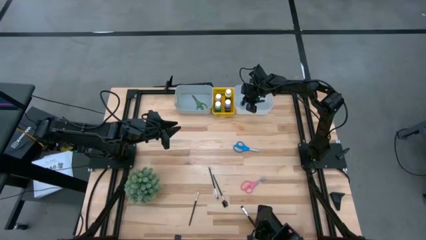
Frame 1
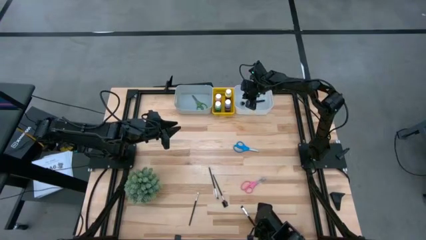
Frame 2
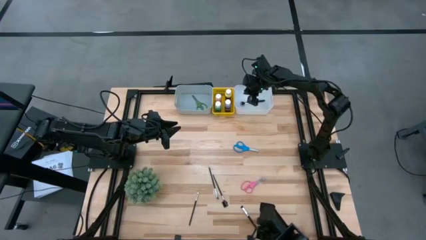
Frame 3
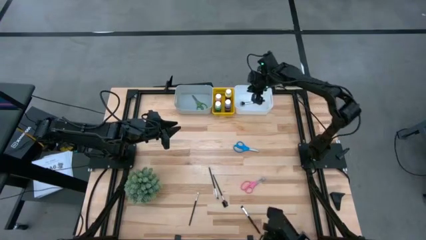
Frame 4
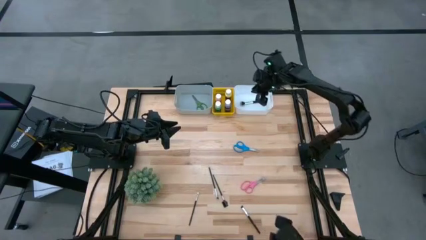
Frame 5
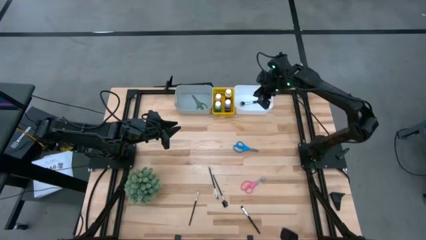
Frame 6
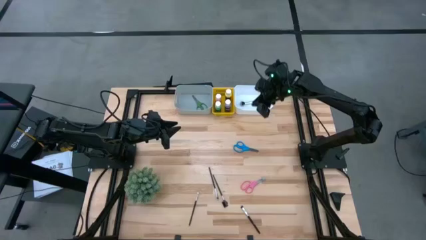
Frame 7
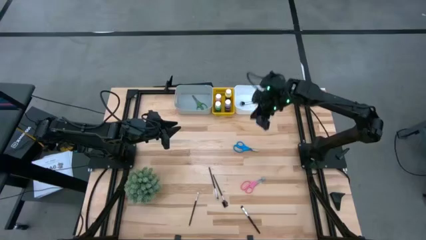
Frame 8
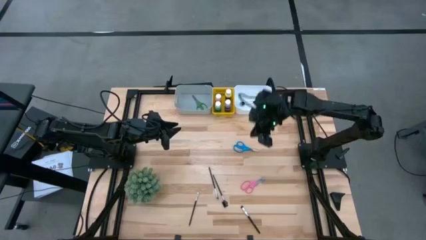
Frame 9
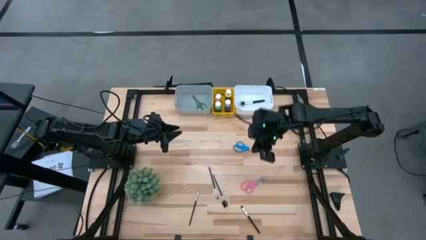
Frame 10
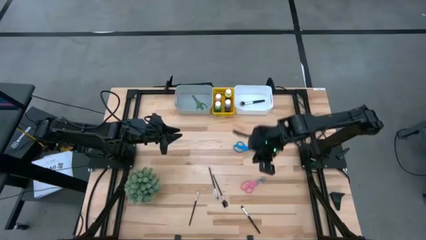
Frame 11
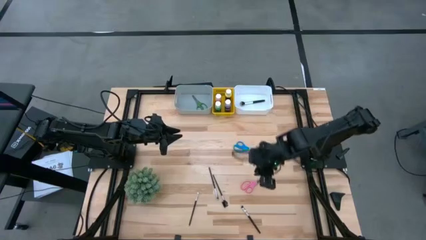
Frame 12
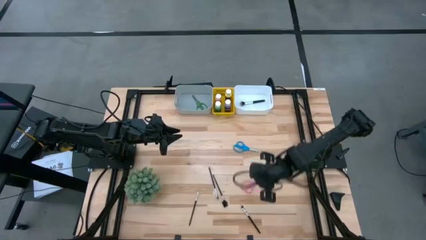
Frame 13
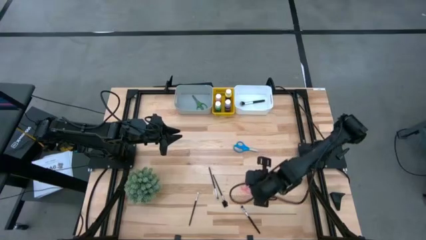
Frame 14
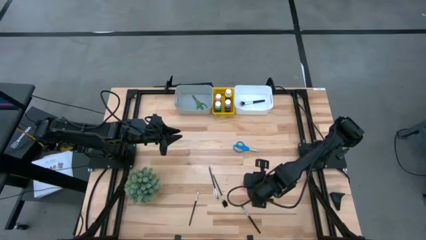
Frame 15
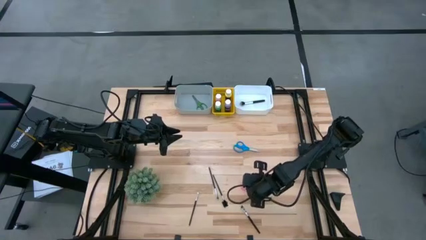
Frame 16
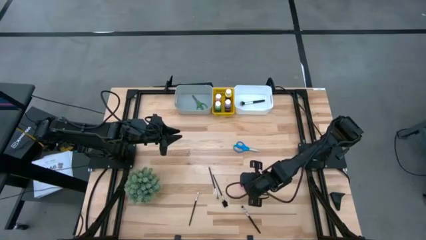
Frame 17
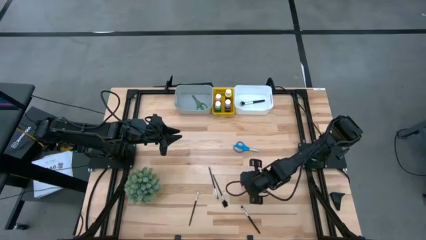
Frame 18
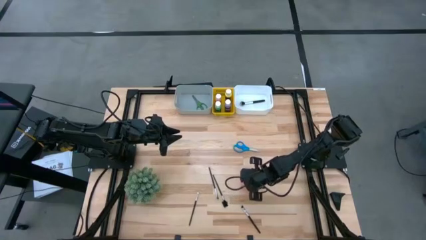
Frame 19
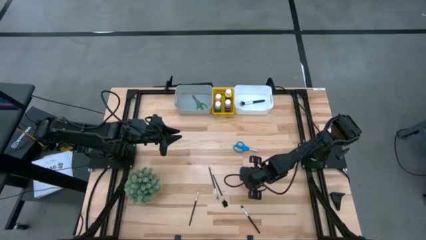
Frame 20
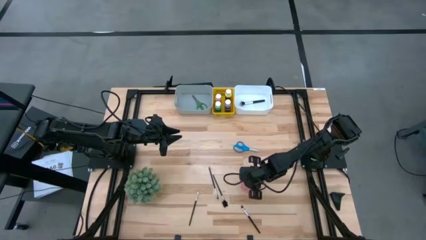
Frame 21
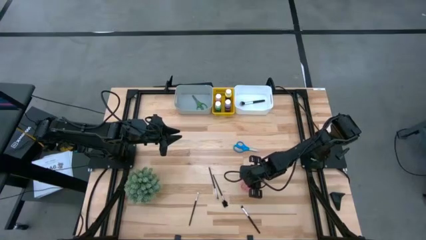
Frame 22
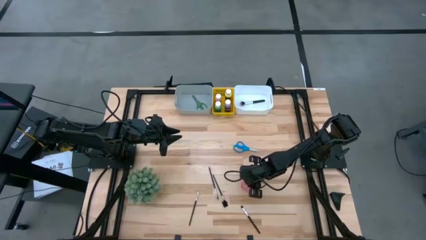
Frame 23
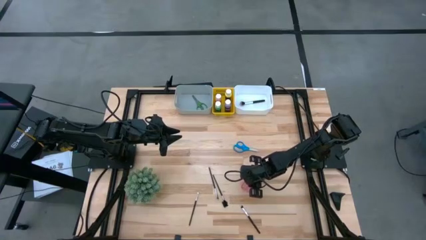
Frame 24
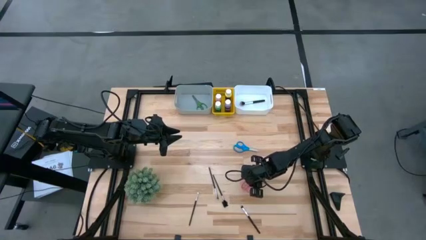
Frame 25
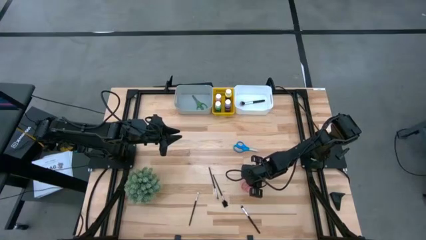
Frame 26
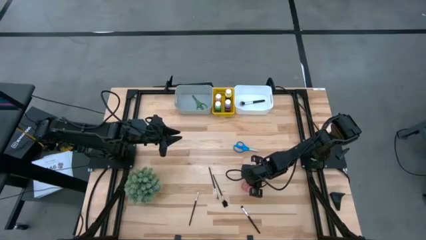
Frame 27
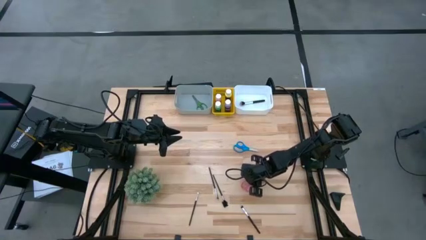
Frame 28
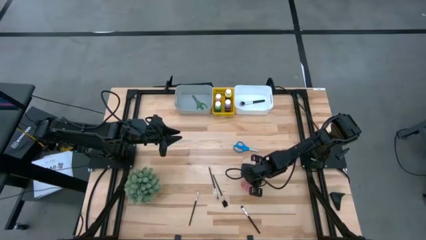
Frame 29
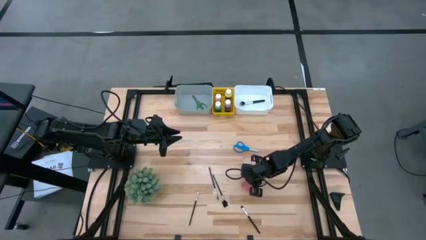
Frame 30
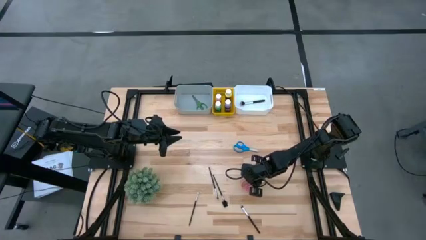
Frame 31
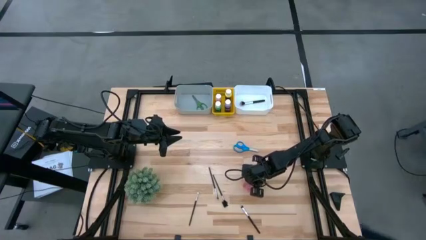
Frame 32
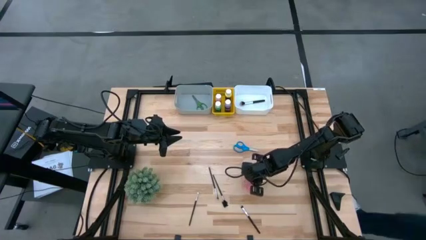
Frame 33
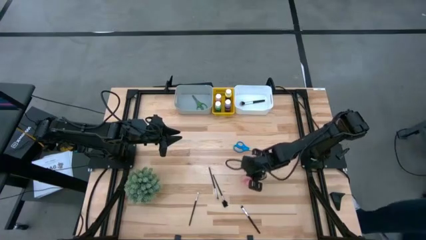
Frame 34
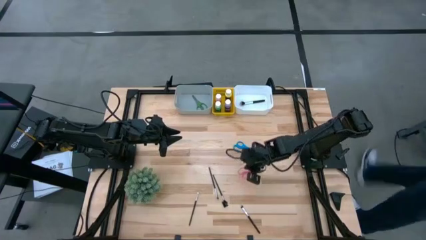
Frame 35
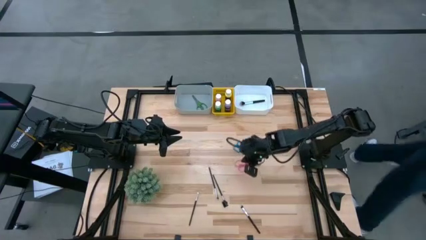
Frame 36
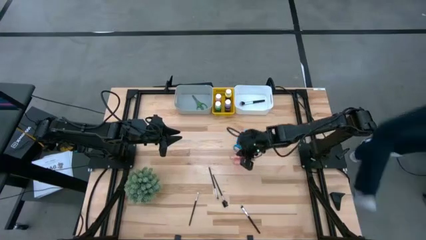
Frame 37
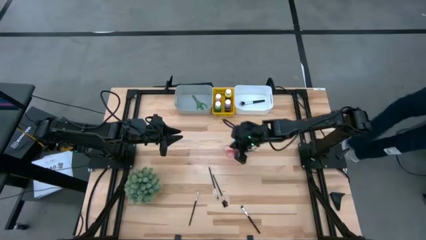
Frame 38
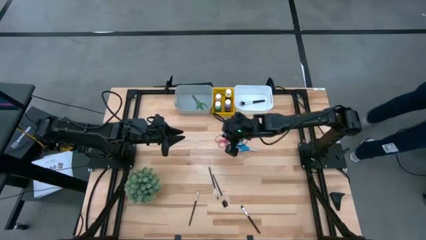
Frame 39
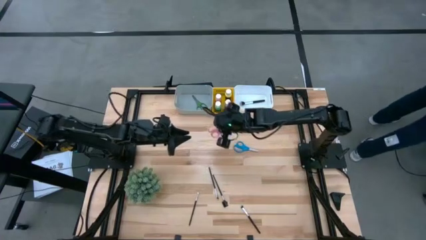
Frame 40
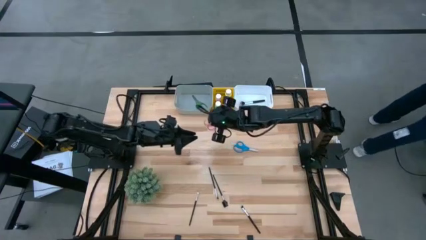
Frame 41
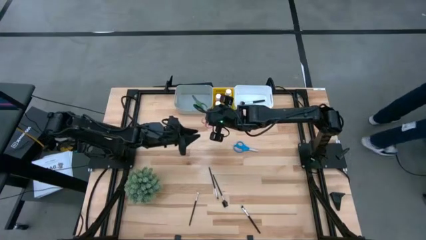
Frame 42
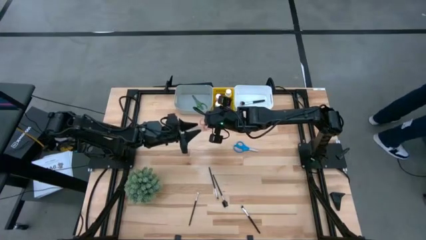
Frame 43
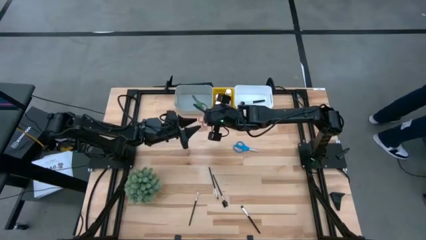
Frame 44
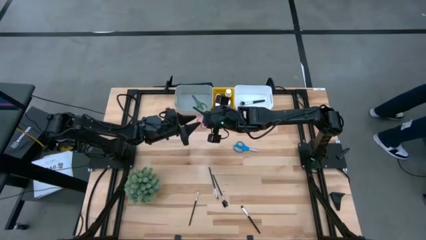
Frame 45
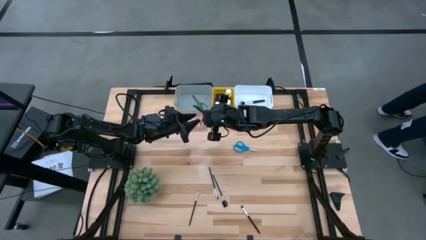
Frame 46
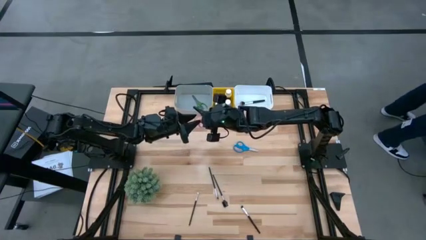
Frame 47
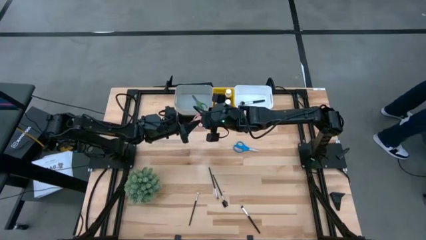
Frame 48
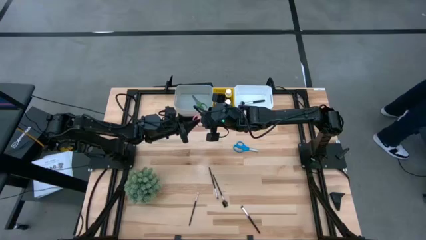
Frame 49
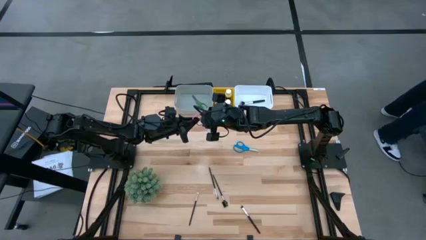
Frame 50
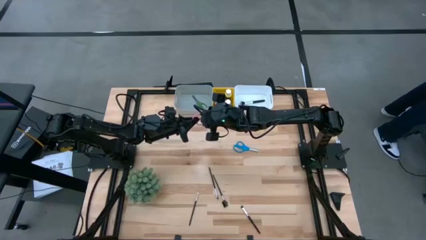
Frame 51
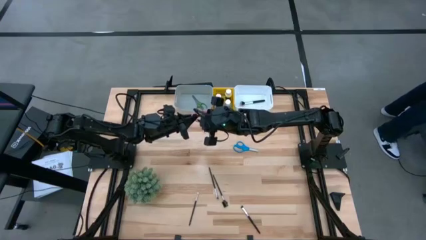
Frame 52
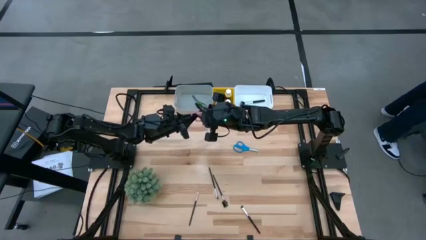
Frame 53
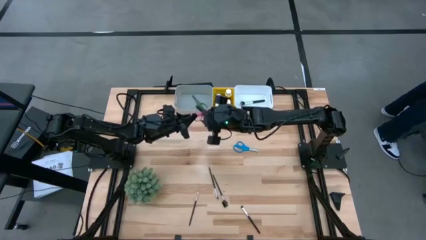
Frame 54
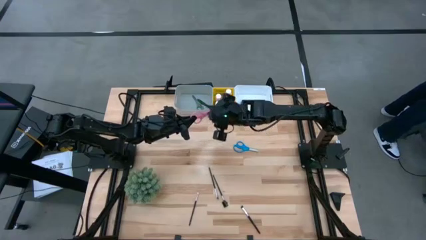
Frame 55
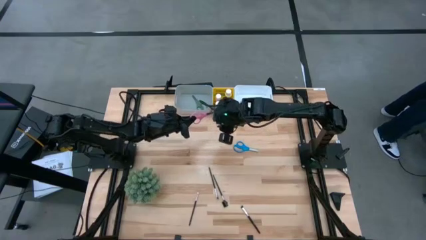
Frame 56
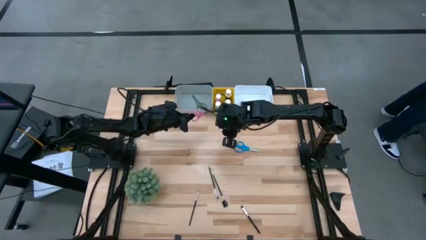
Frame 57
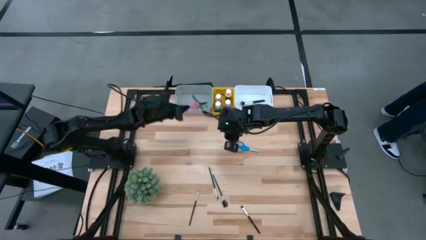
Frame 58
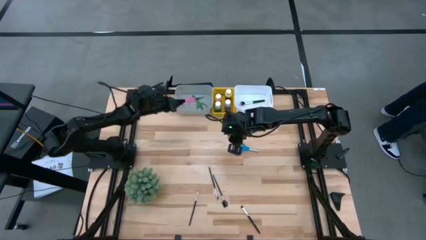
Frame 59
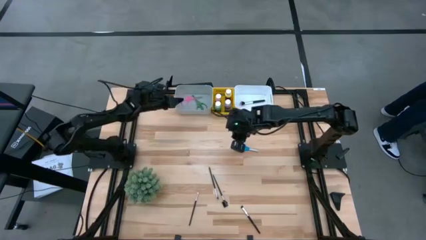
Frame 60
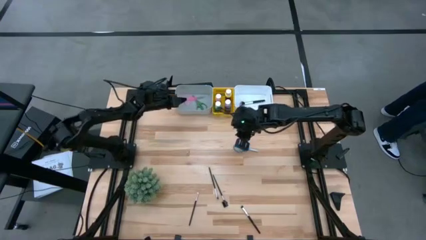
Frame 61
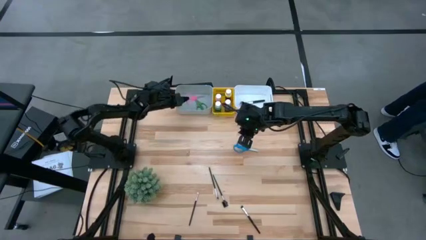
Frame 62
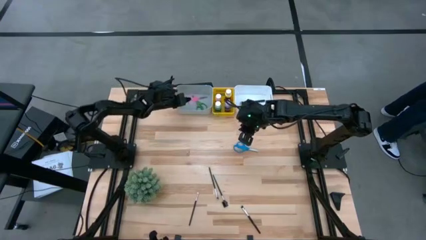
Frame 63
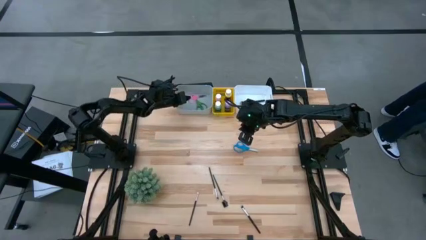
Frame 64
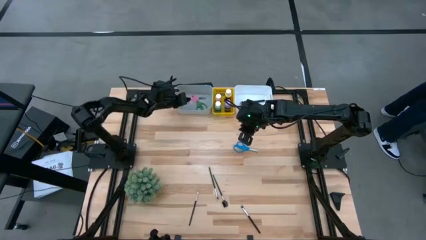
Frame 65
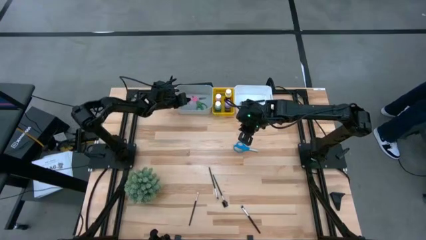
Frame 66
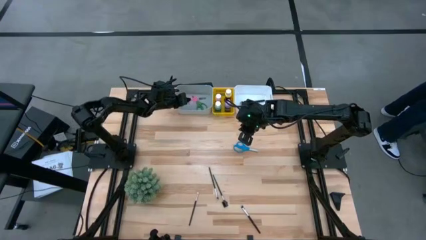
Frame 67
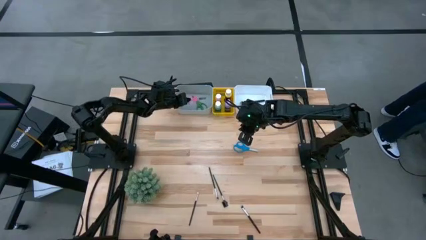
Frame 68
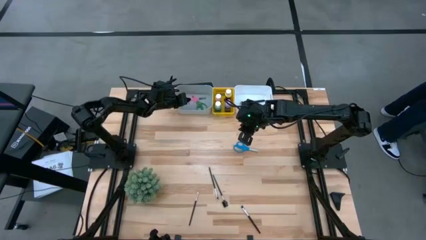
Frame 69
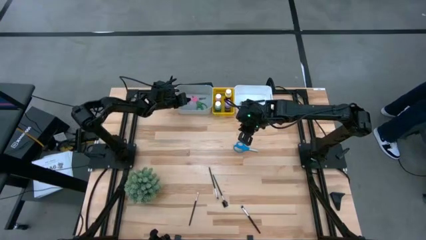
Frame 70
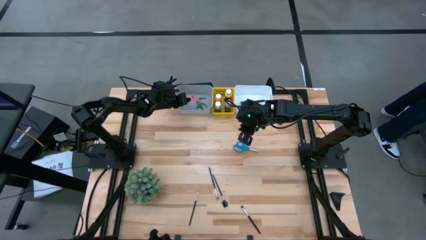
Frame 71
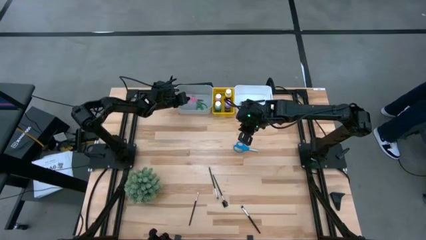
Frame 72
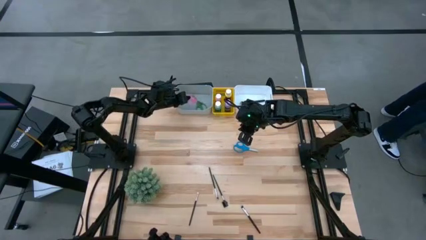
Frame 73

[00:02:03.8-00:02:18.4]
Task: Pick & Place Paint Supplies
Put the pink scissors into the gray bin

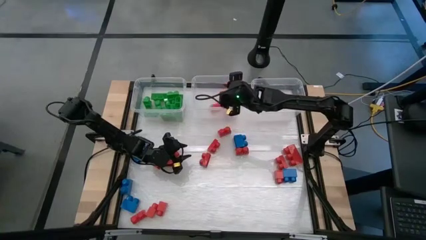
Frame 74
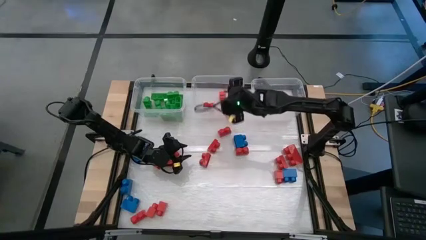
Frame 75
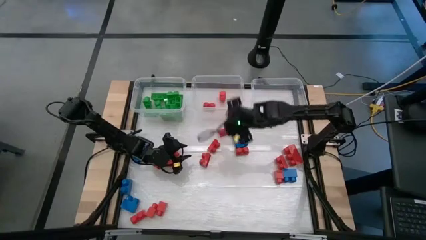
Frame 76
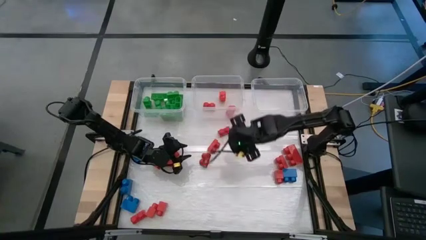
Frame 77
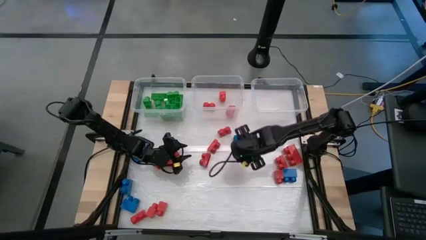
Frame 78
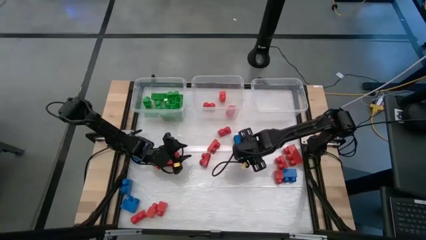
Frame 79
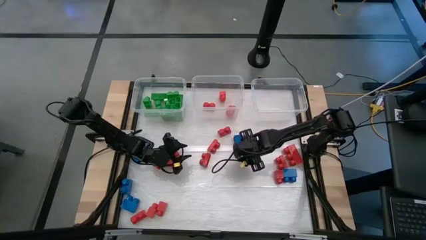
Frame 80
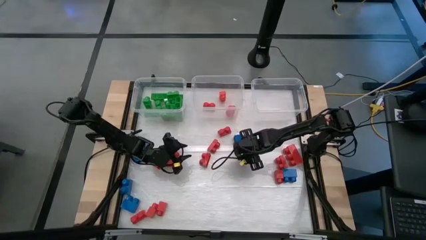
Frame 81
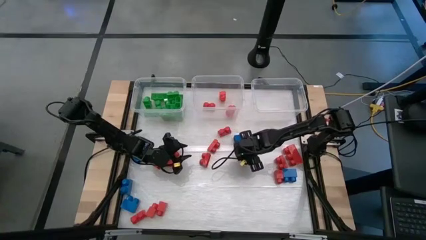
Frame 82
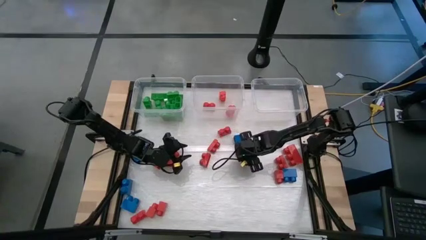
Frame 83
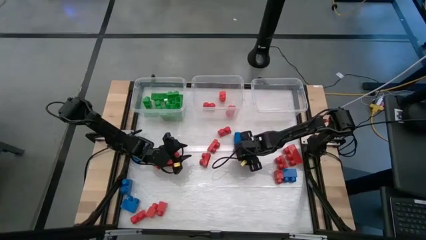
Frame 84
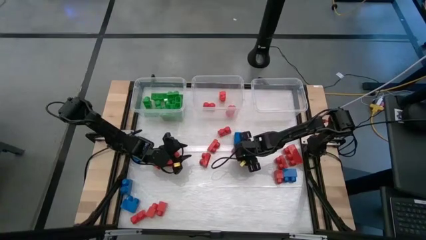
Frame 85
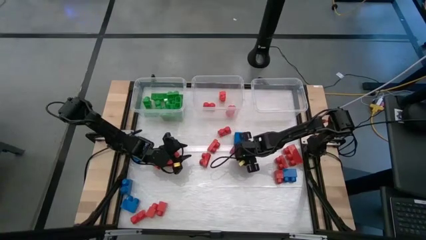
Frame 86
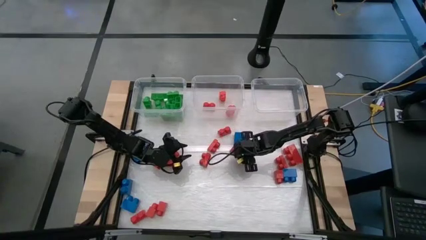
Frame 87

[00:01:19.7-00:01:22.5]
Task: Sort blocks
Put the red game piece into the middle transparent bin
